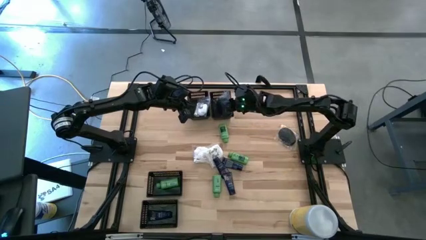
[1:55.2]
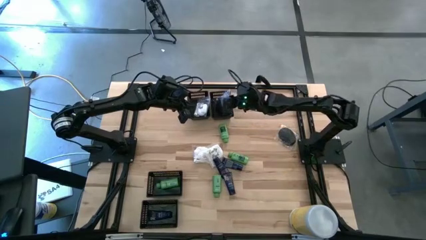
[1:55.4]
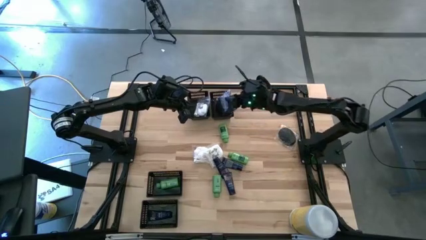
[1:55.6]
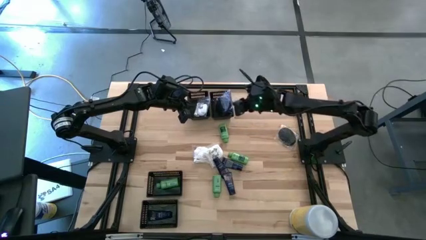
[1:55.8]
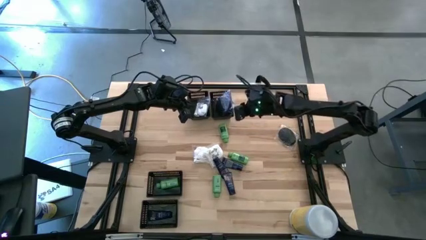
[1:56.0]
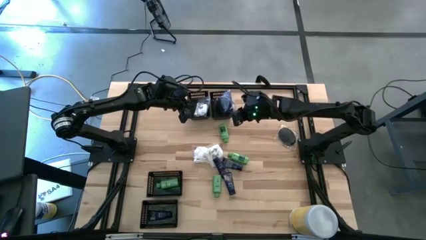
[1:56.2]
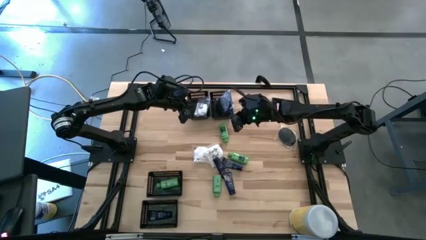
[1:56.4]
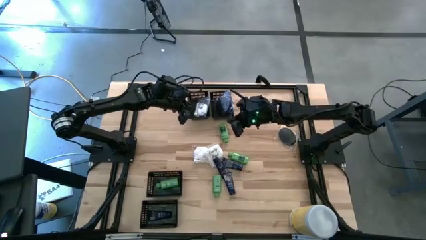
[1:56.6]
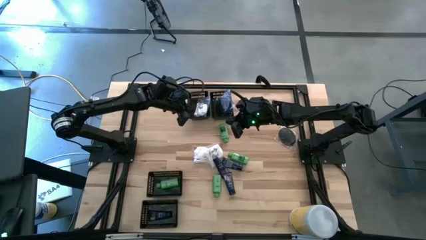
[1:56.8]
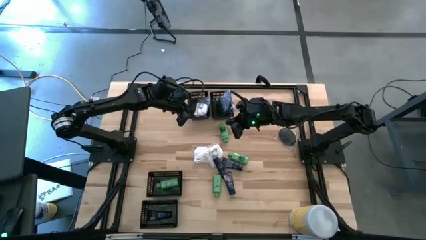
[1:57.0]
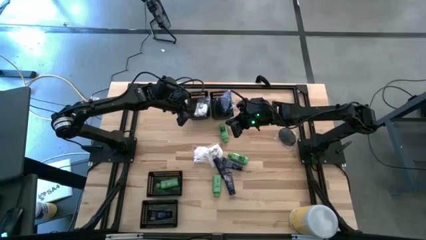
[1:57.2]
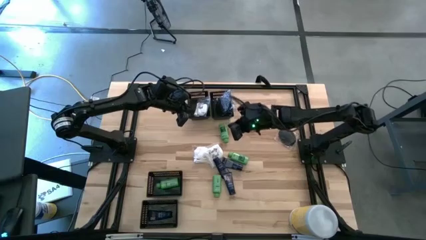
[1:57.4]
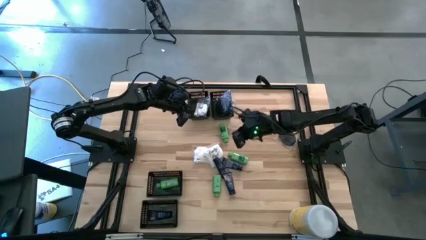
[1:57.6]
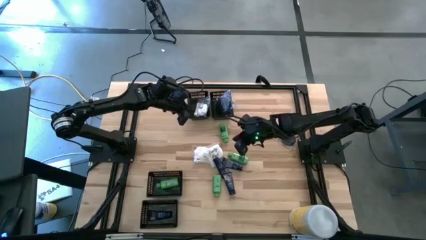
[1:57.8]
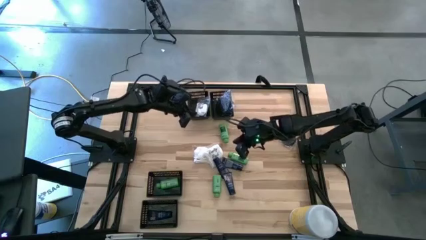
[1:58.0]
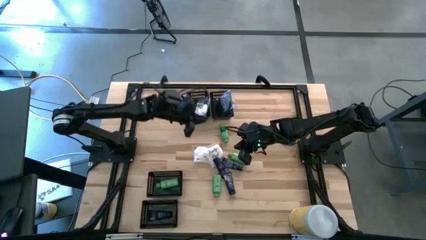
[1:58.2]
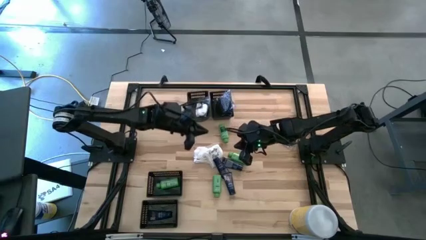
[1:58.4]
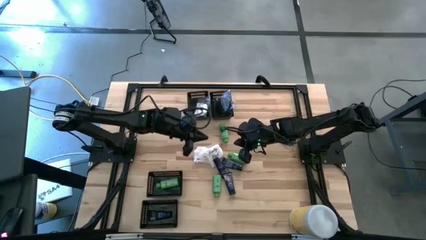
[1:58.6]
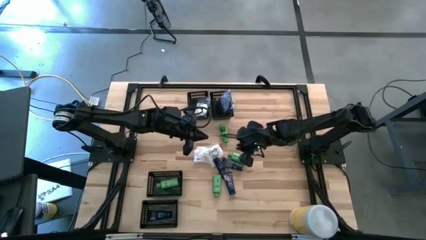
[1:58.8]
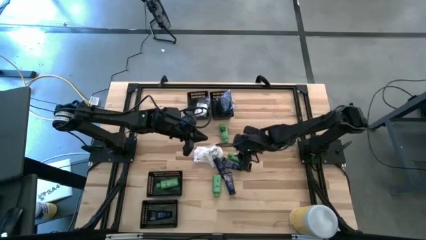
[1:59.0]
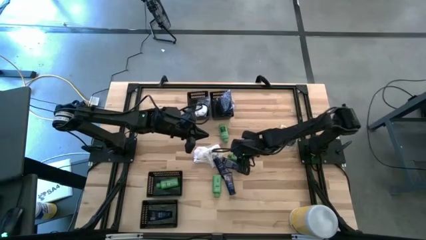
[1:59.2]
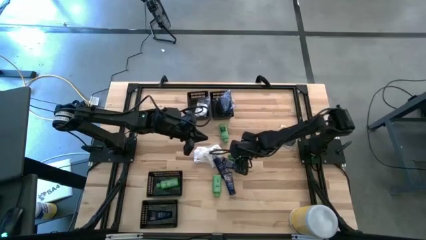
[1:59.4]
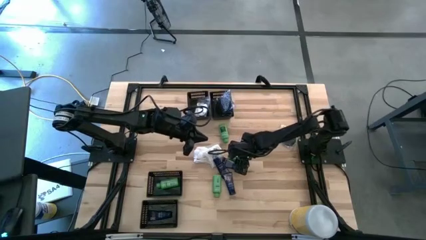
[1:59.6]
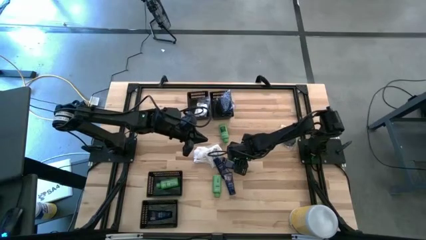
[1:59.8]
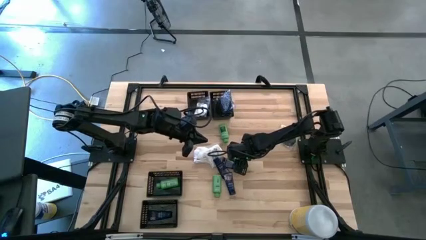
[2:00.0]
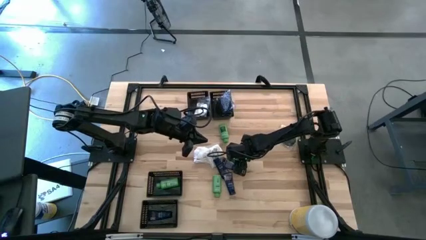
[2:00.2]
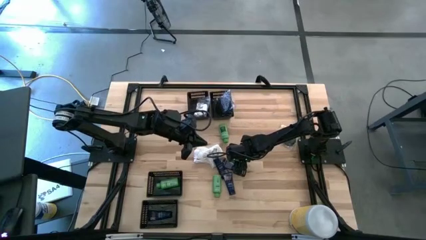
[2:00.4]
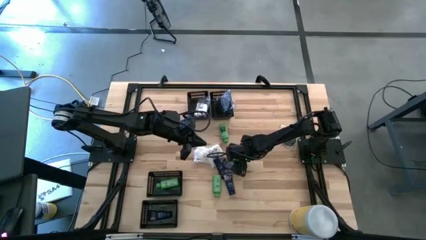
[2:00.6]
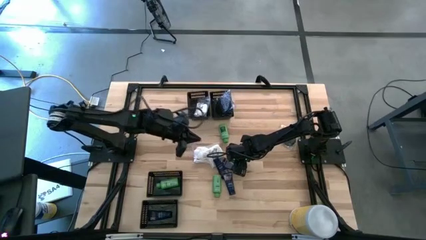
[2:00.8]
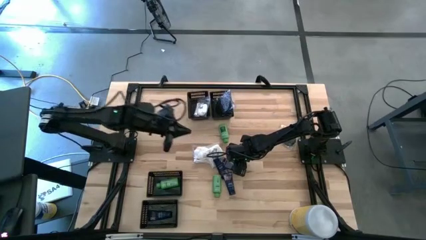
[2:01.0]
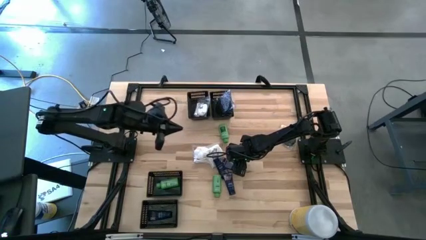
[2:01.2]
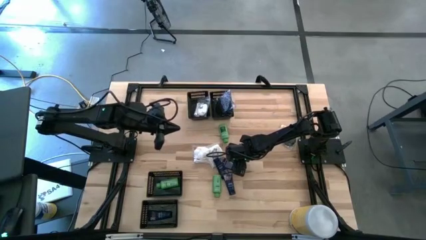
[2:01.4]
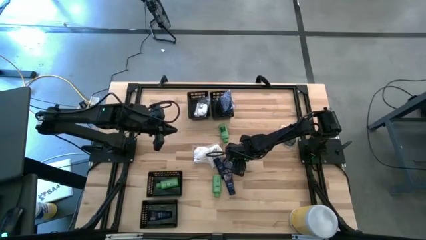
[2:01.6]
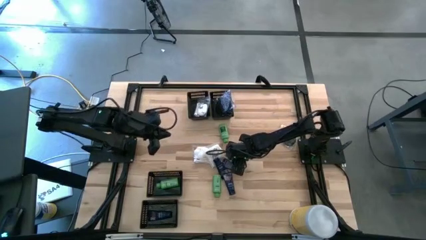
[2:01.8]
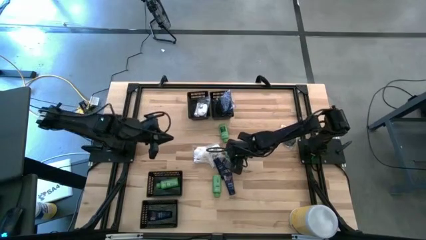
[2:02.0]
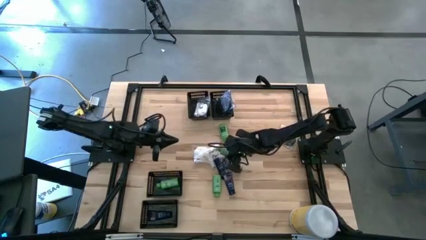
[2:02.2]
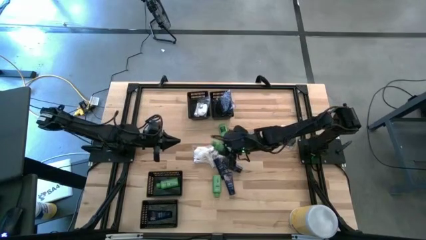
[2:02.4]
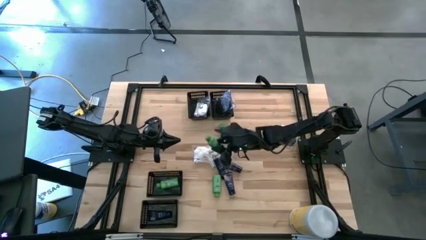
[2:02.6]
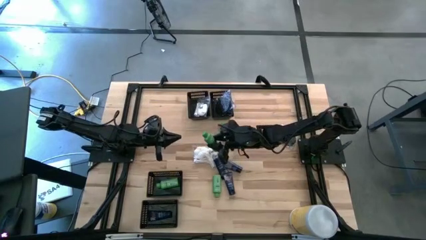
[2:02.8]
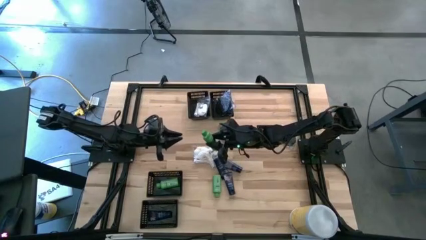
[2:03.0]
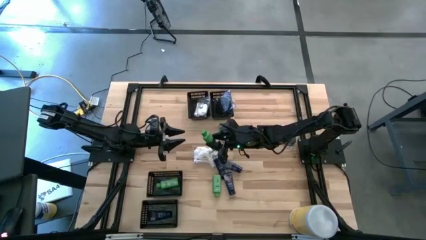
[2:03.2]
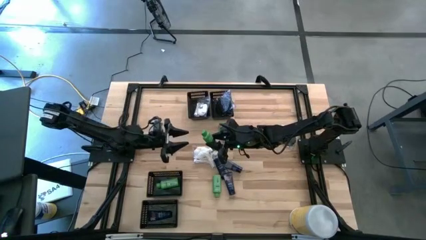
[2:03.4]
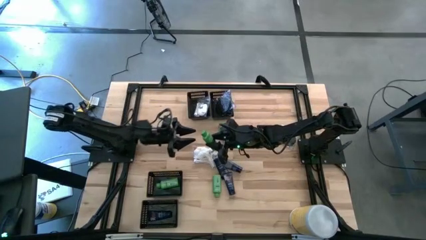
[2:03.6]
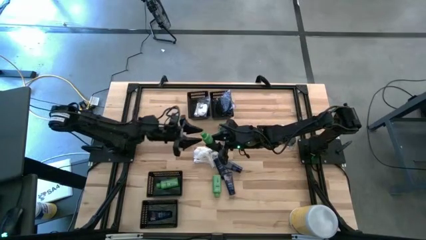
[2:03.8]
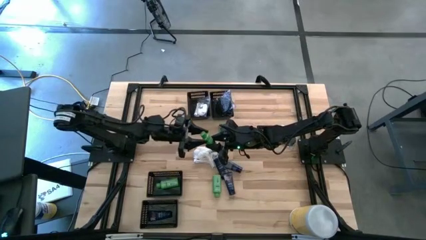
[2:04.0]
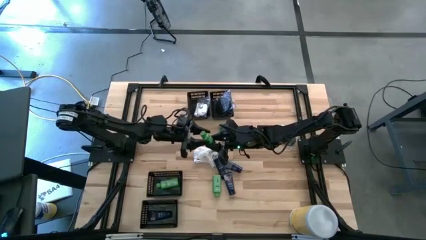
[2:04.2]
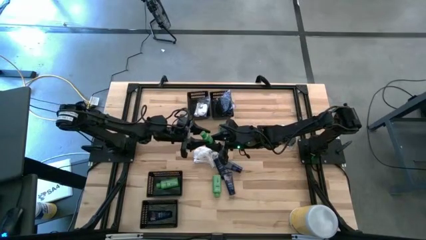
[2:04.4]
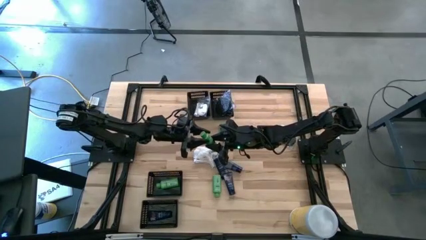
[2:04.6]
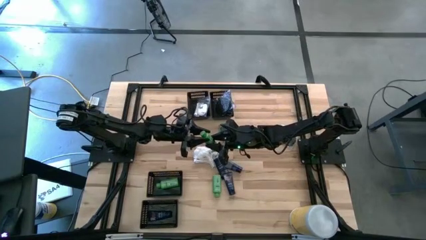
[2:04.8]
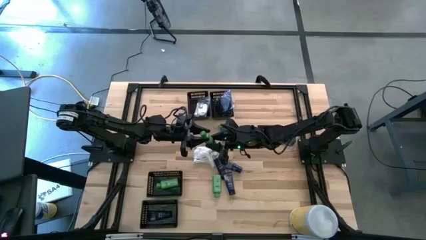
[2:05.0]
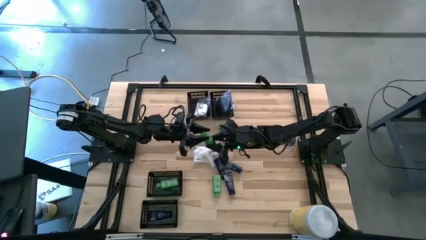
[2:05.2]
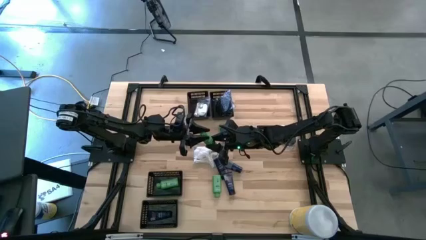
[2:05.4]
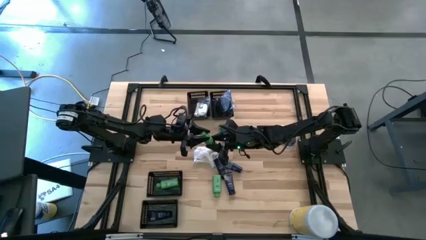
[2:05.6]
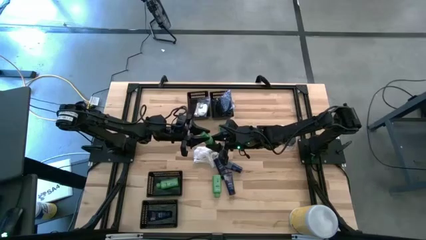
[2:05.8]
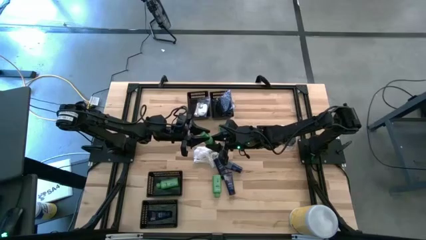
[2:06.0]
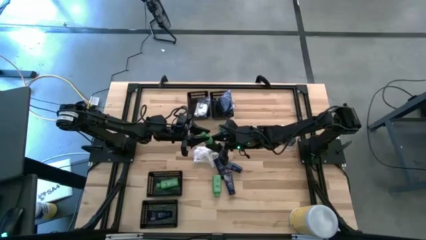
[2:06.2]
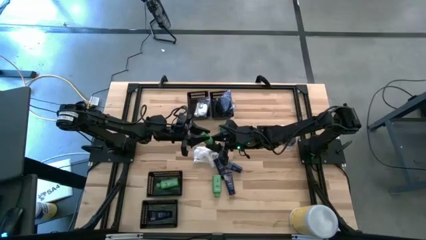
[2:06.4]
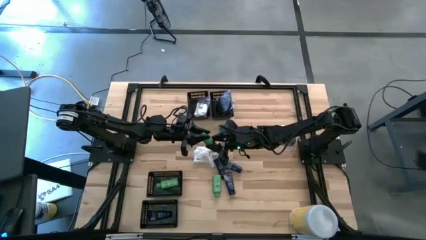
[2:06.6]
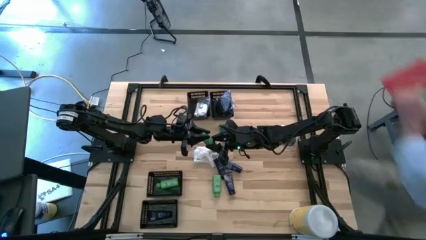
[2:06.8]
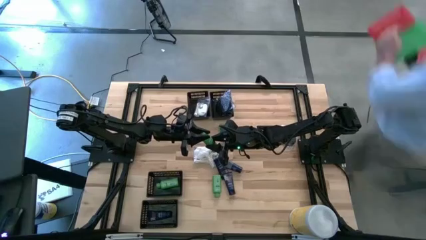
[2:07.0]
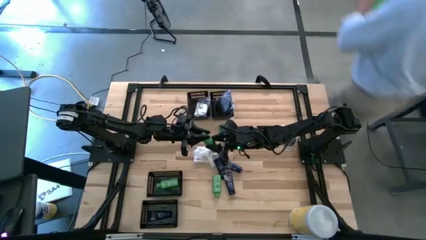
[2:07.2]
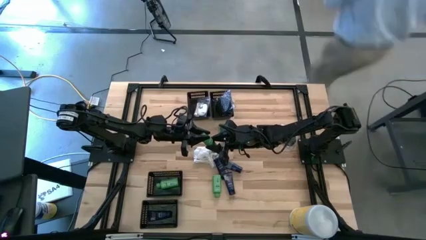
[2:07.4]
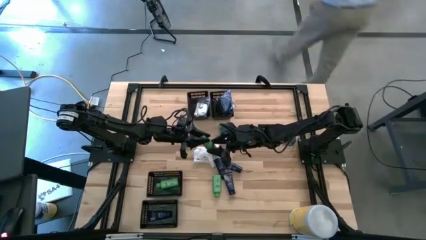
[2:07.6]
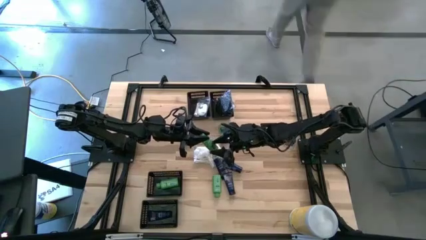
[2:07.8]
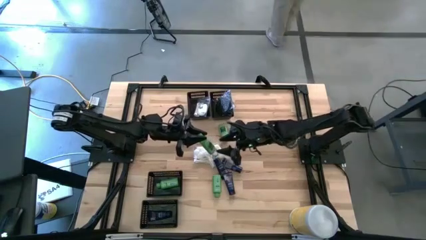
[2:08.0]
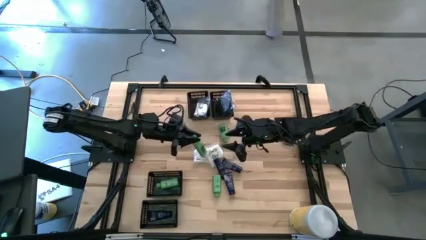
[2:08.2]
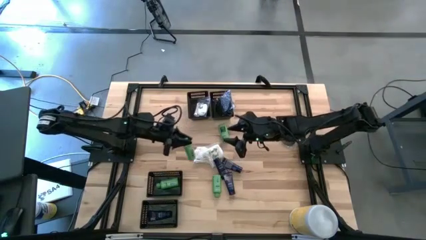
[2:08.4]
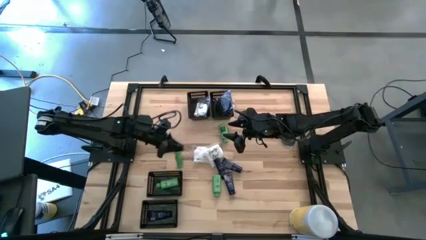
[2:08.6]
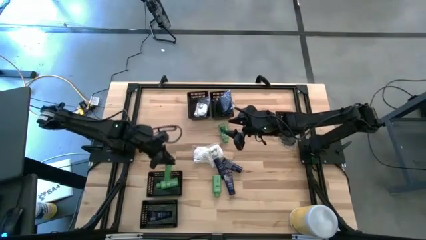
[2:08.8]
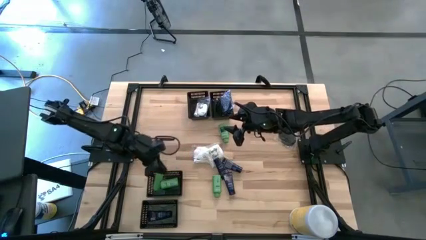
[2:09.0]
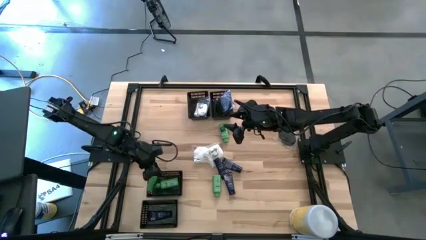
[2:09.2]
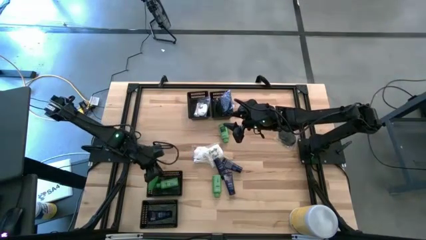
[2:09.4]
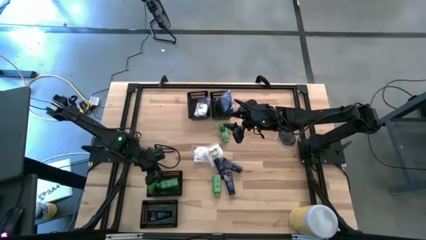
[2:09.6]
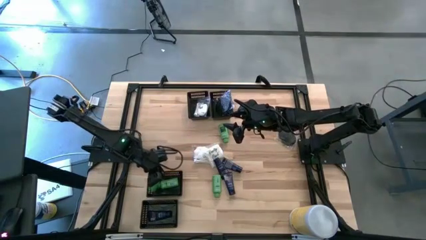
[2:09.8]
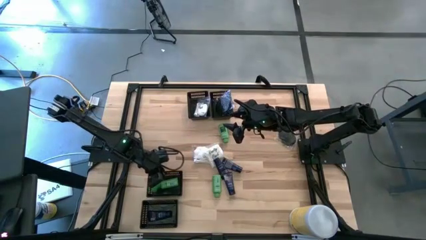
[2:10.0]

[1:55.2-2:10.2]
Task: Pick & Place Travel size toiletries
Put the green shampoo into the middle left basket
